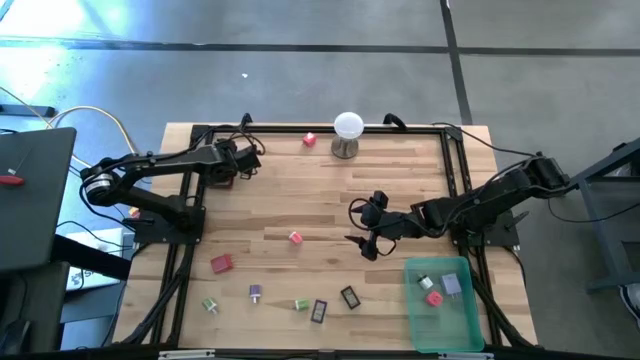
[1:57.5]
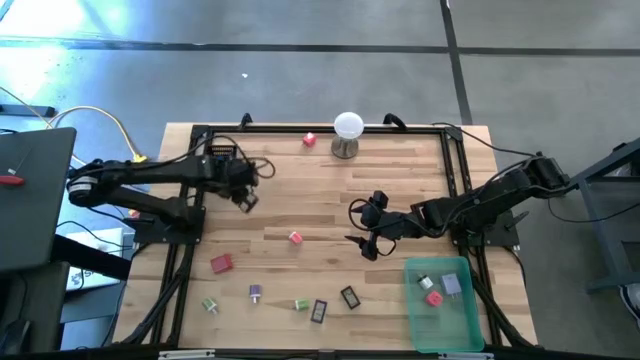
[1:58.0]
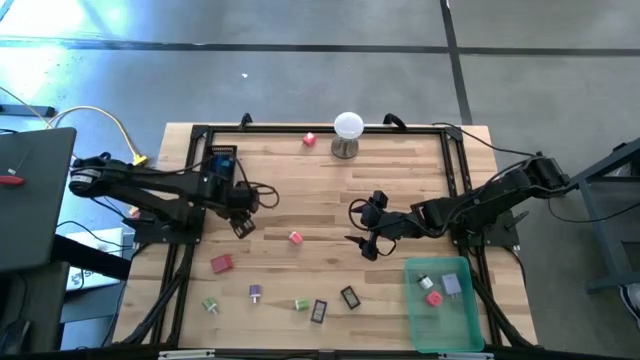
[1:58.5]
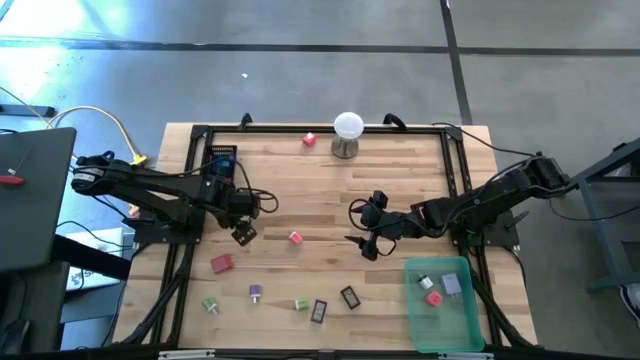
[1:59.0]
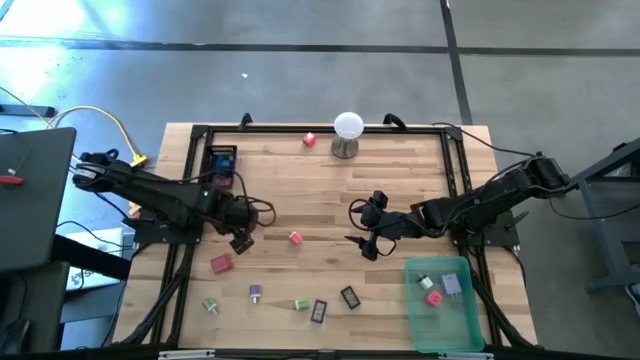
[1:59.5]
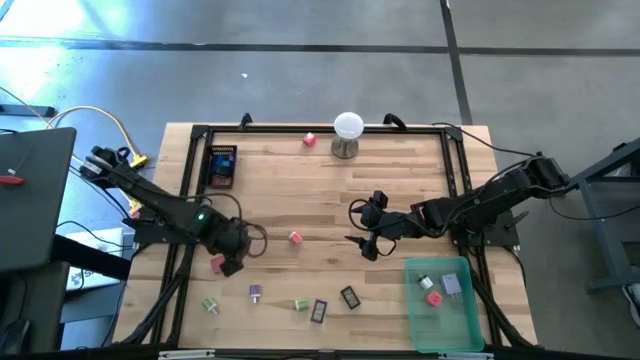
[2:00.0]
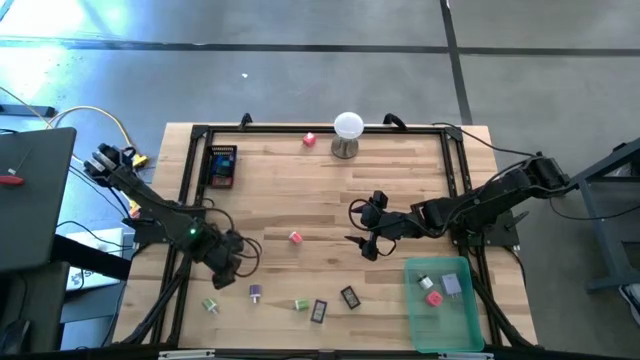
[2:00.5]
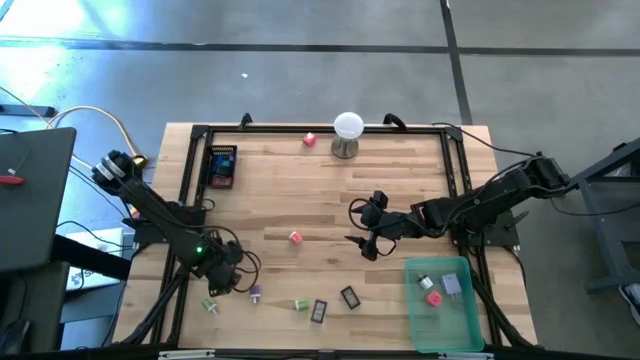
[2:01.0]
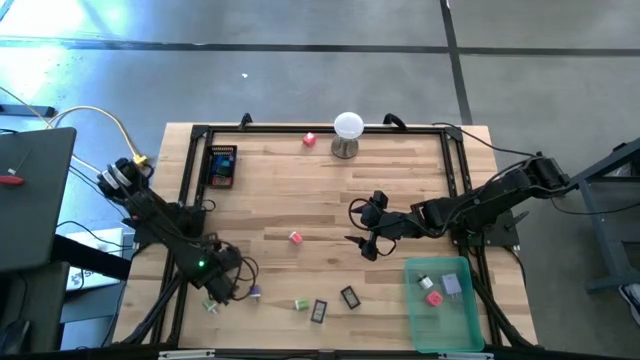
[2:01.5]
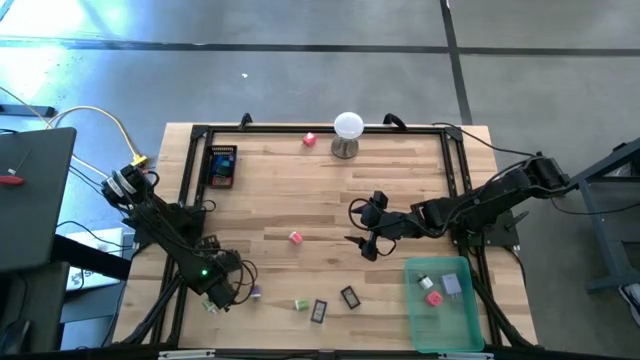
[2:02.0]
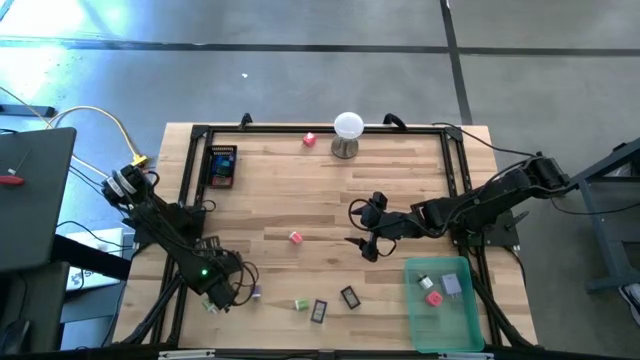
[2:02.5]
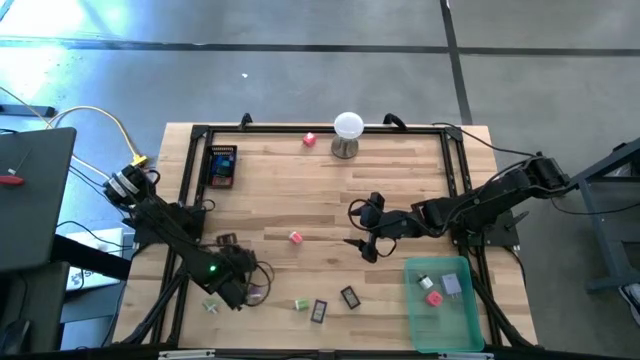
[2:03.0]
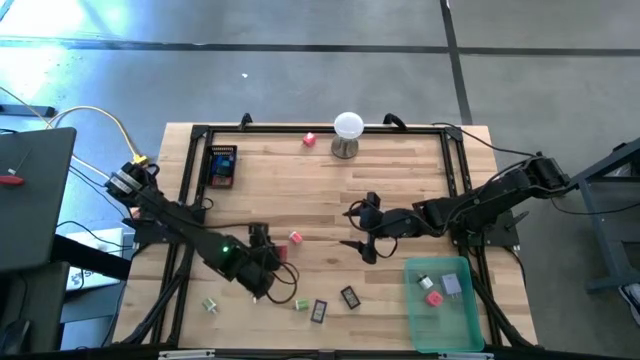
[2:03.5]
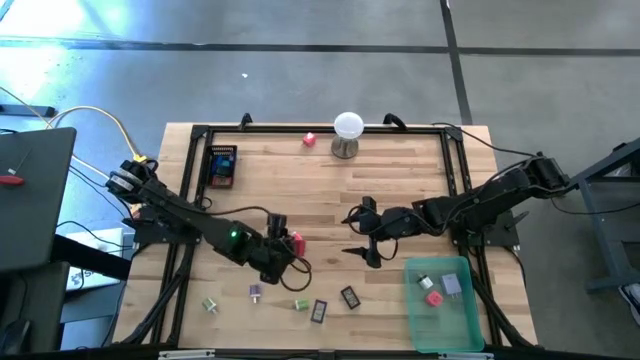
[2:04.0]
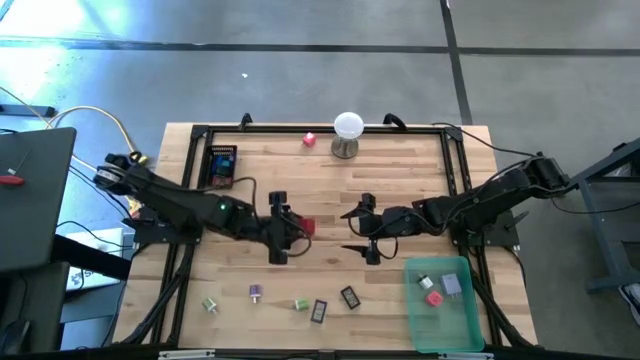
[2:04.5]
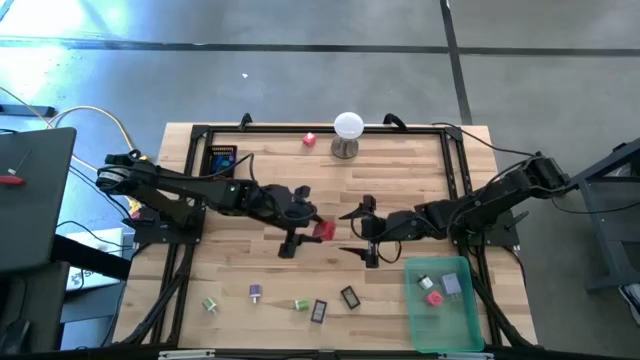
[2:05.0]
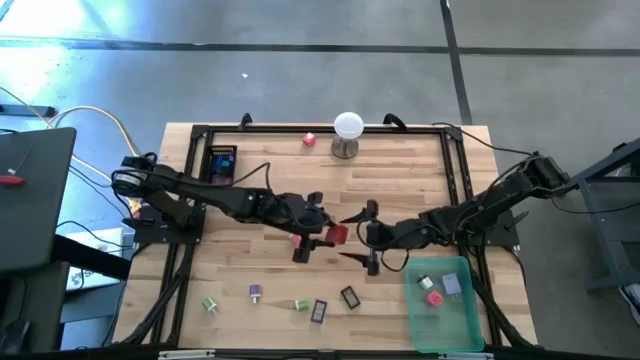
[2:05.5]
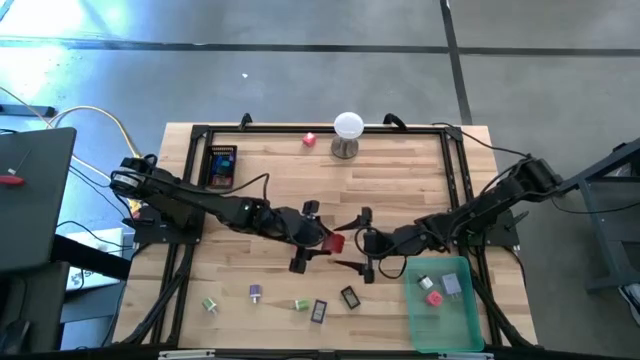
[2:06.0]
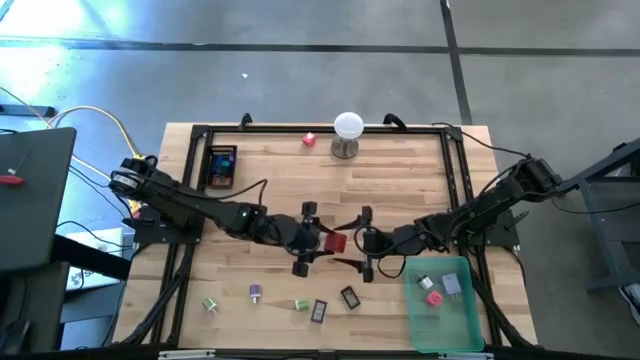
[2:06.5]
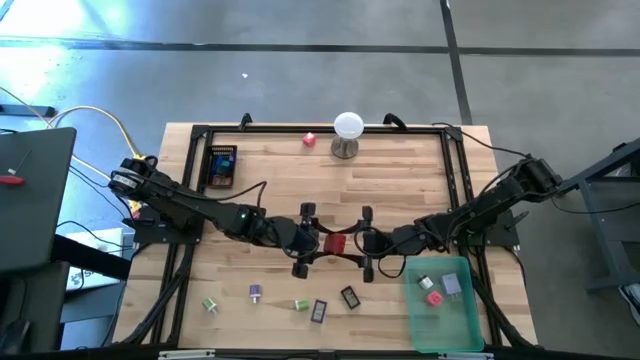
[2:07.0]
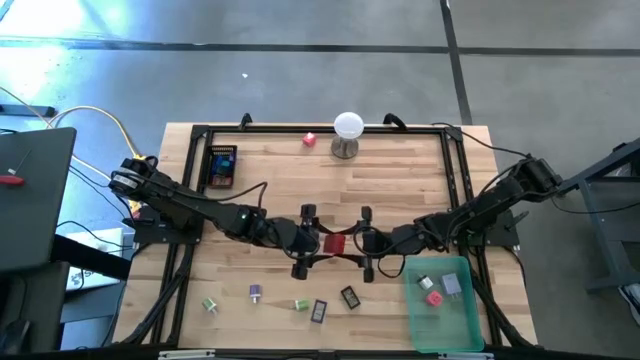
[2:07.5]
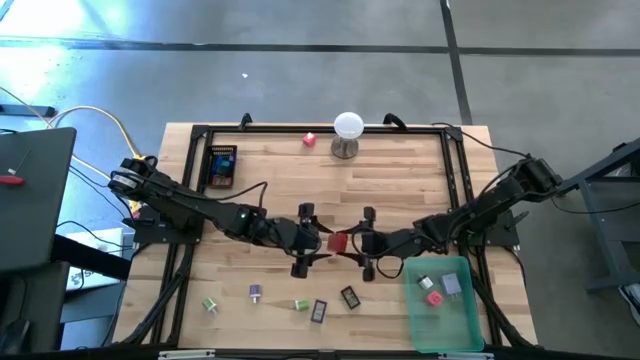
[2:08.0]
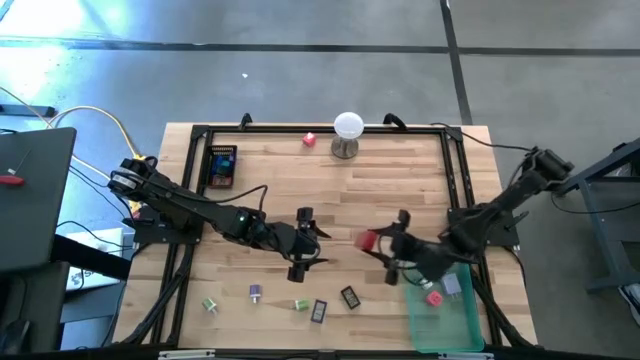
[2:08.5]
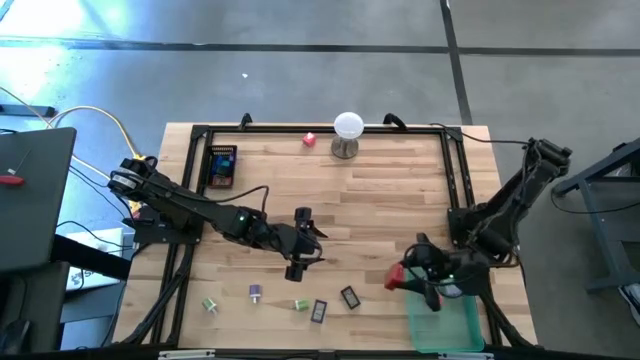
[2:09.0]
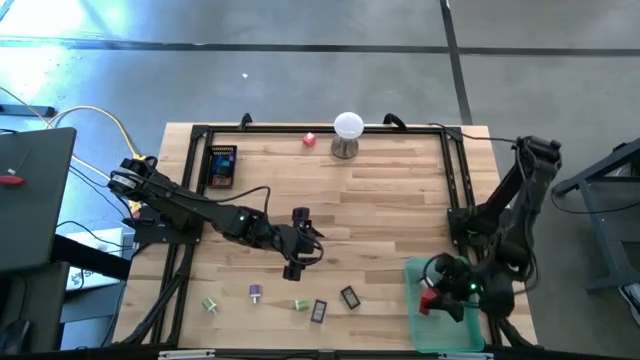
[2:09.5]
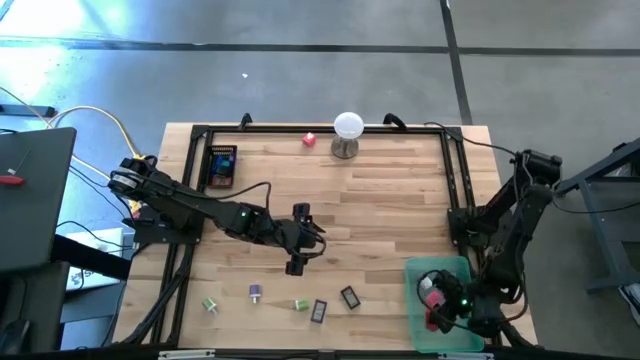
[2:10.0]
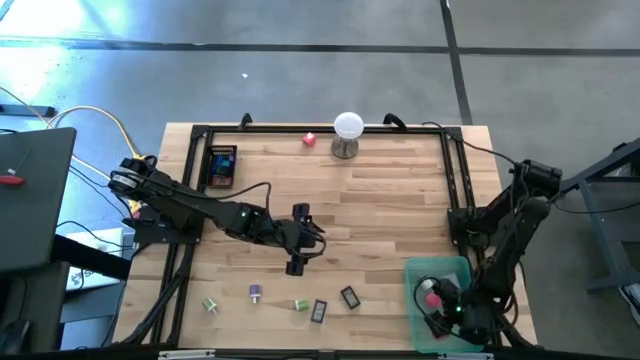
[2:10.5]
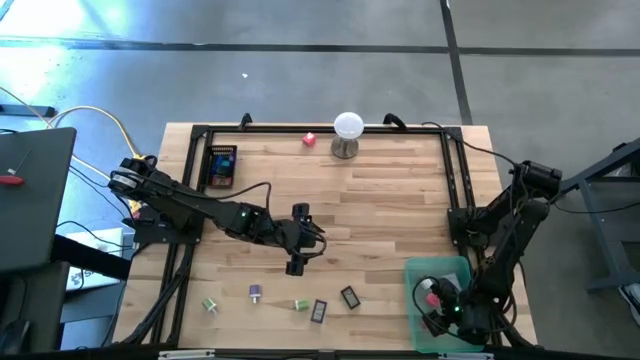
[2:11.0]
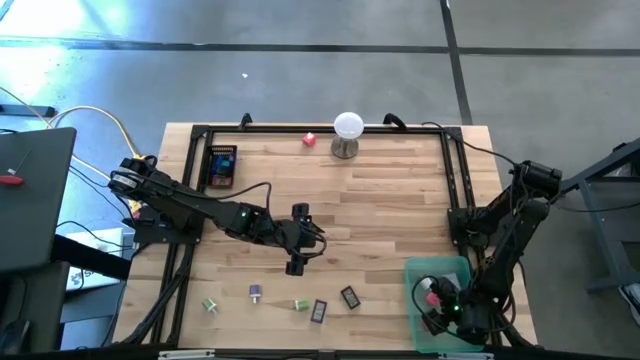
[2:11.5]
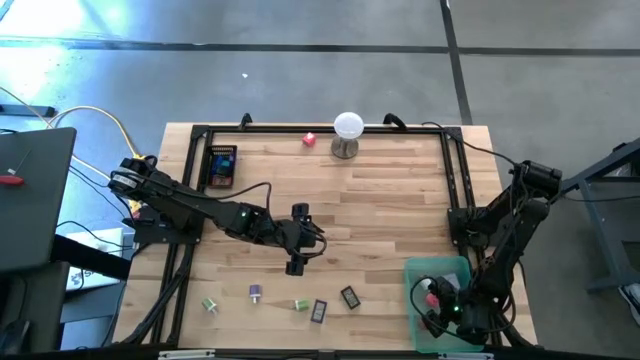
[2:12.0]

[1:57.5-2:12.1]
Task: Pick & Place Office items
Put the red charger adapter into the green bin

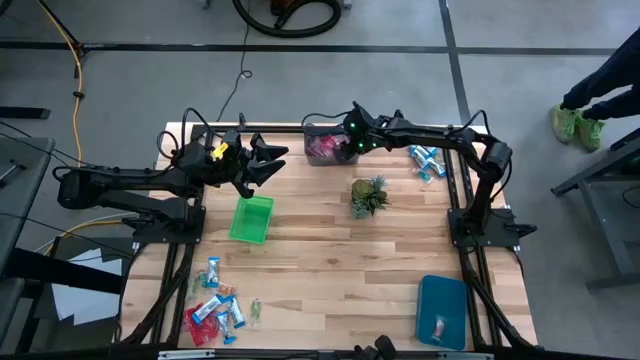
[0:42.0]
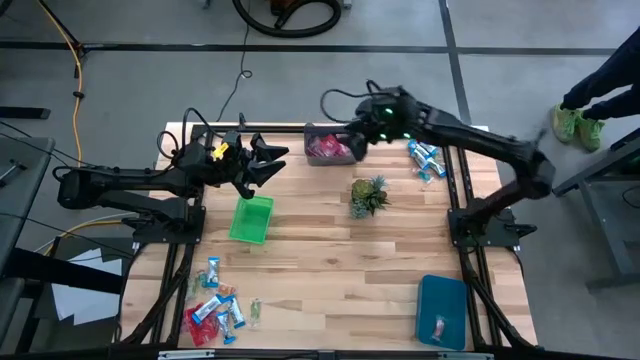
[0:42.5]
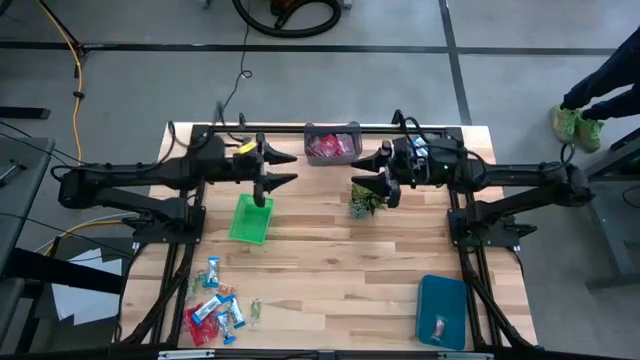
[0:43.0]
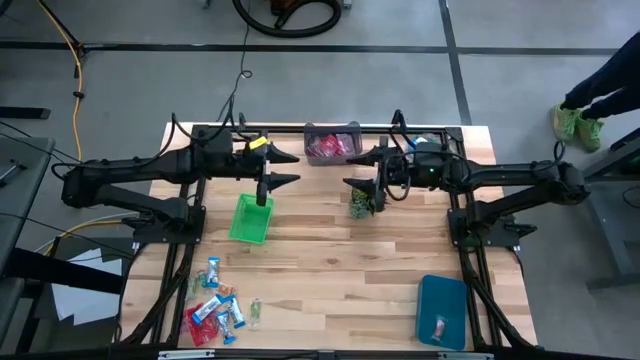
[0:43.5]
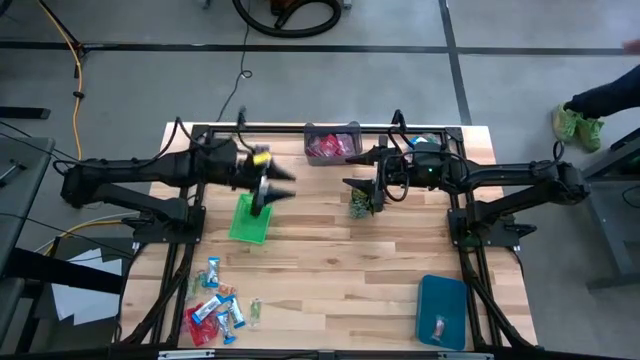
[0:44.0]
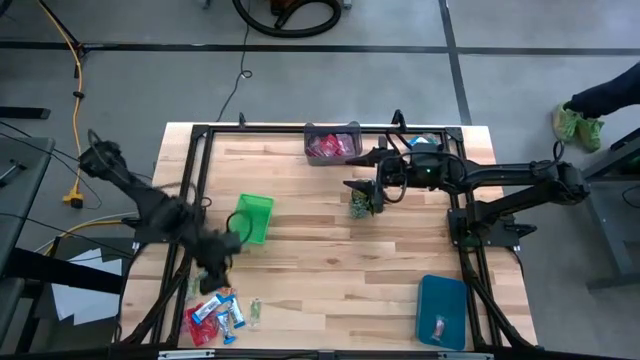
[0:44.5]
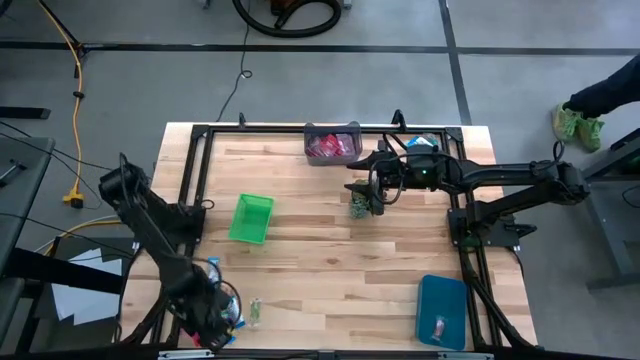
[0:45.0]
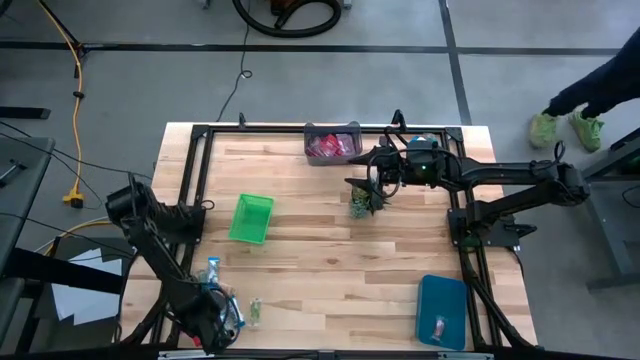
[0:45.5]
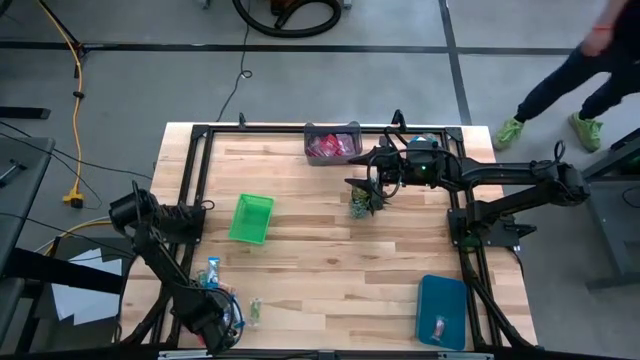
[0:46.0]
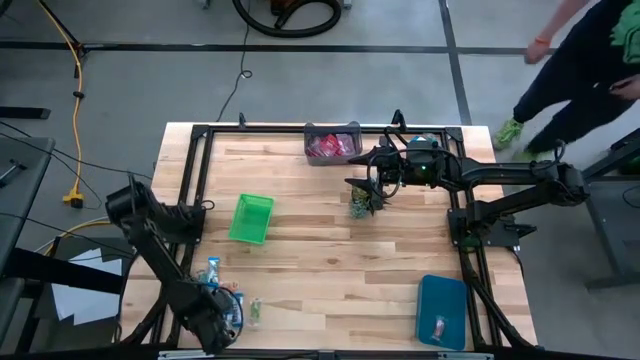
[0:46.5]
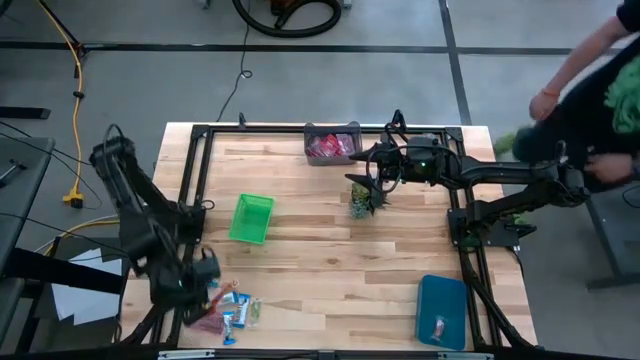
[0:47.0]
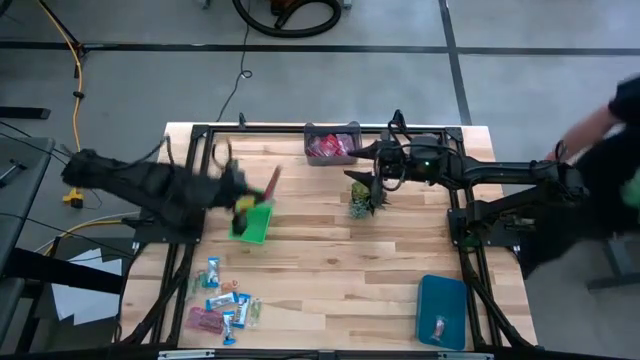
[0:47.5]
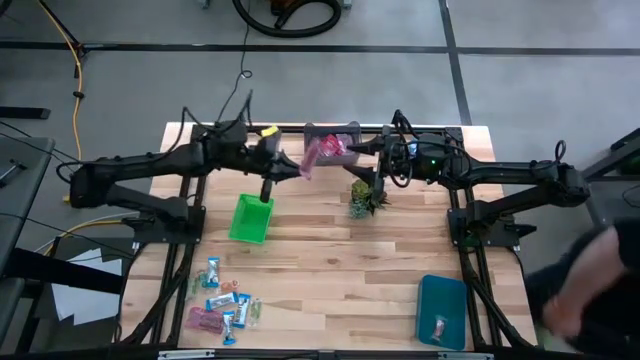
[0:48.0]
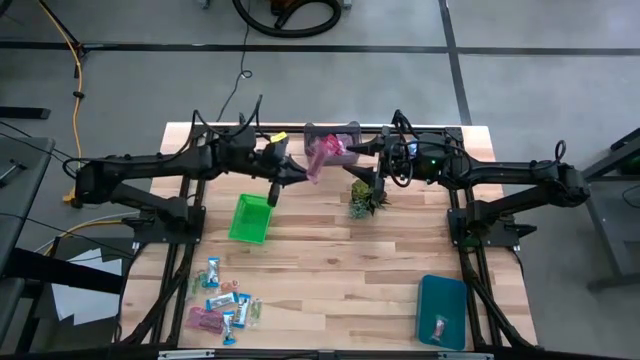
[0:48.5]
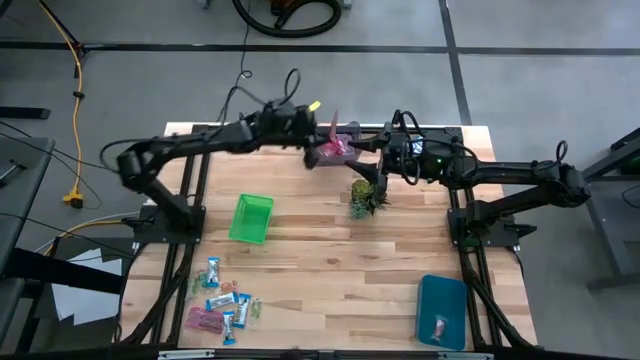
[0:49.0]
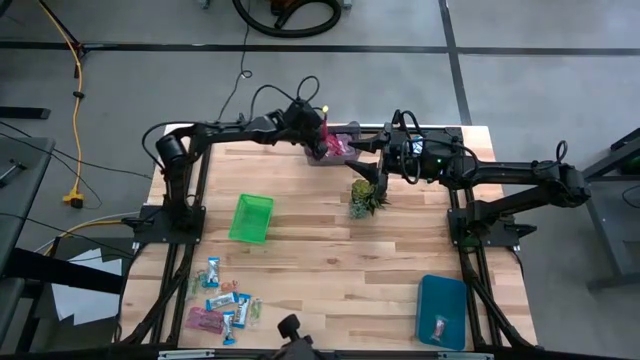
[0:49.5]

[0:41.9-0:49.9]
Task: Sort candy
Put the red candy into the black transparent bin
